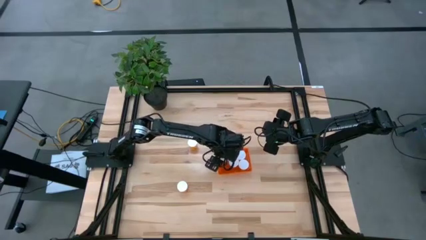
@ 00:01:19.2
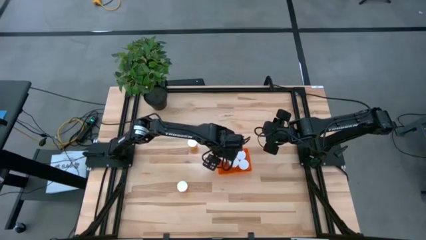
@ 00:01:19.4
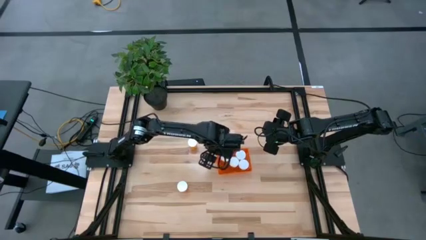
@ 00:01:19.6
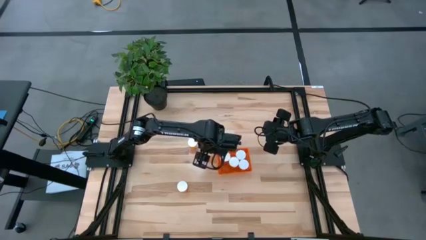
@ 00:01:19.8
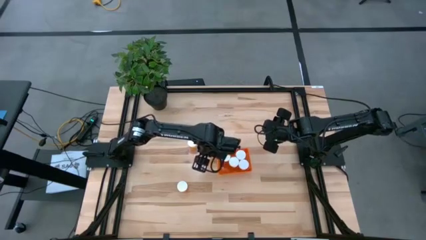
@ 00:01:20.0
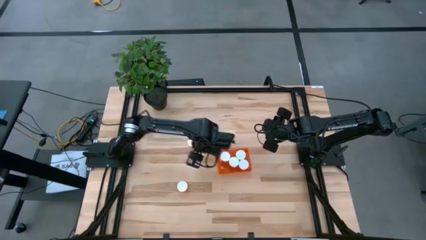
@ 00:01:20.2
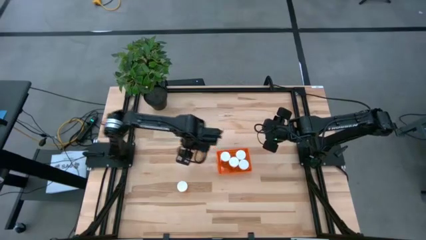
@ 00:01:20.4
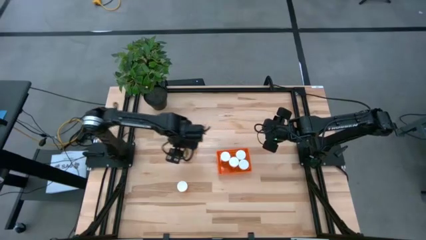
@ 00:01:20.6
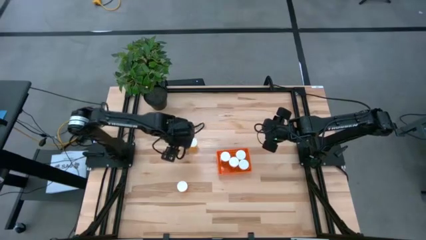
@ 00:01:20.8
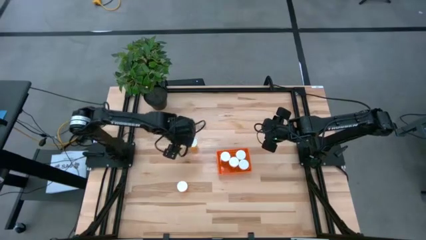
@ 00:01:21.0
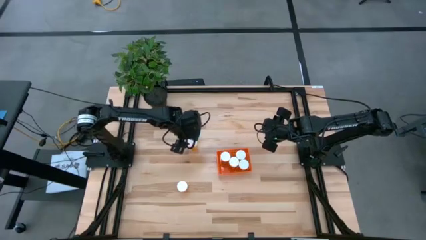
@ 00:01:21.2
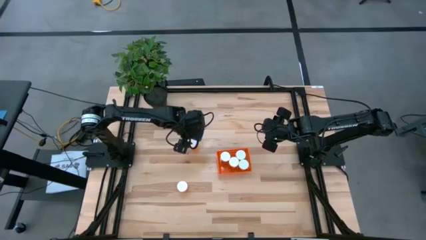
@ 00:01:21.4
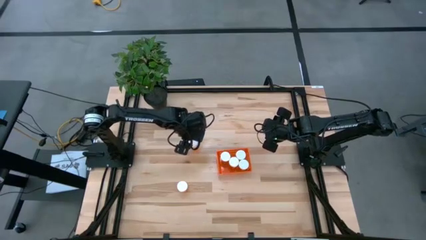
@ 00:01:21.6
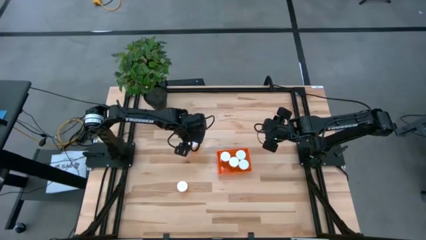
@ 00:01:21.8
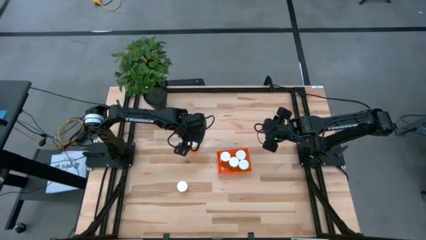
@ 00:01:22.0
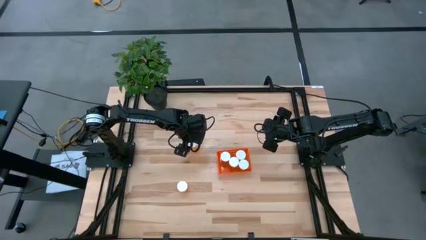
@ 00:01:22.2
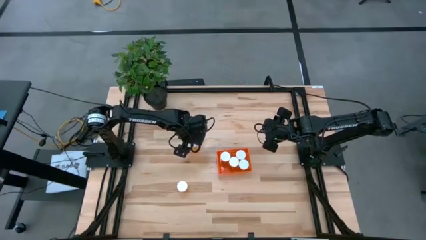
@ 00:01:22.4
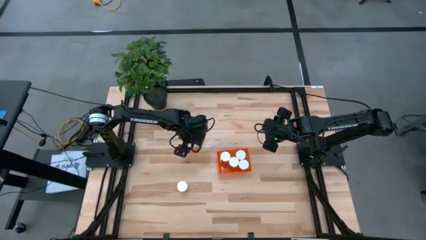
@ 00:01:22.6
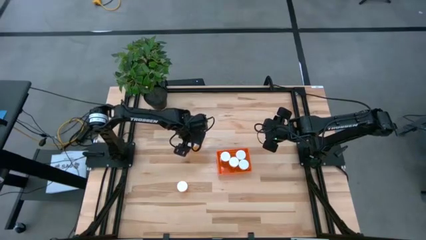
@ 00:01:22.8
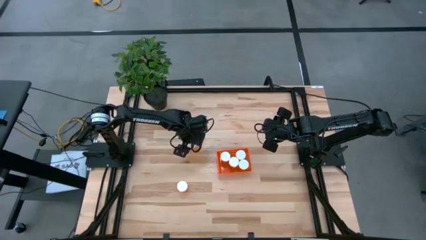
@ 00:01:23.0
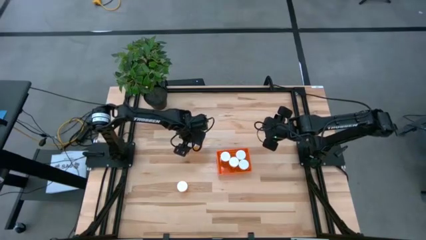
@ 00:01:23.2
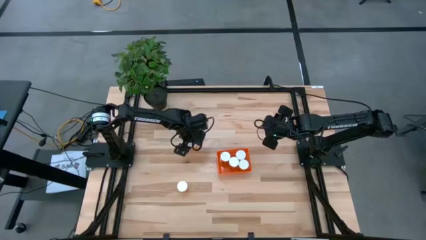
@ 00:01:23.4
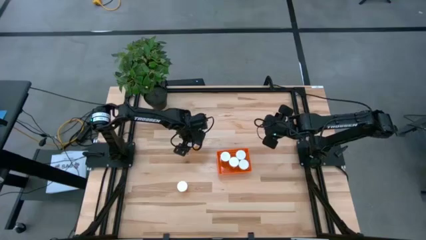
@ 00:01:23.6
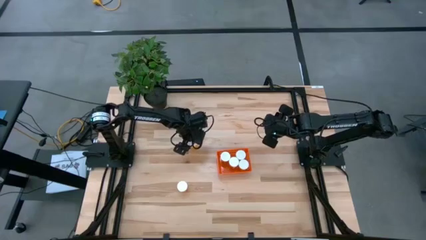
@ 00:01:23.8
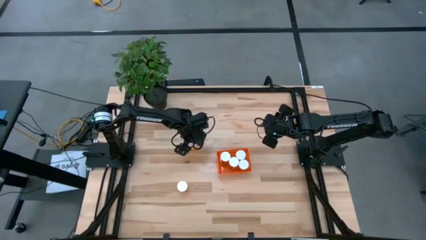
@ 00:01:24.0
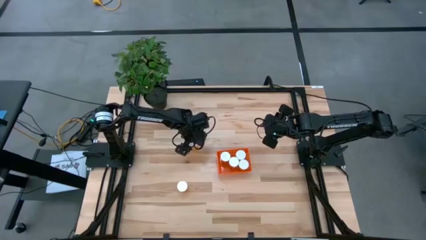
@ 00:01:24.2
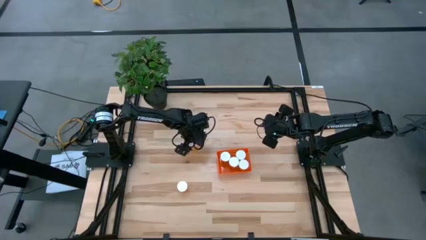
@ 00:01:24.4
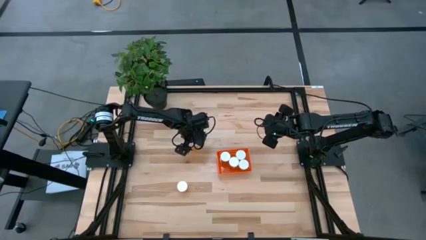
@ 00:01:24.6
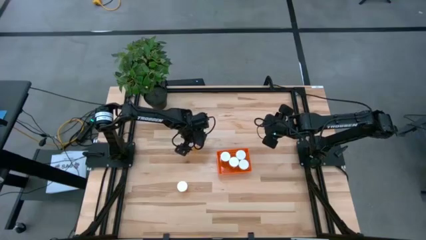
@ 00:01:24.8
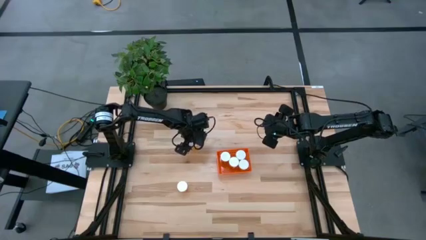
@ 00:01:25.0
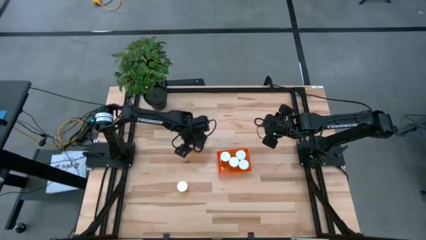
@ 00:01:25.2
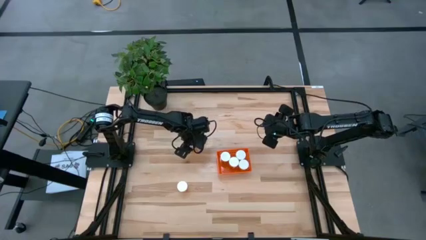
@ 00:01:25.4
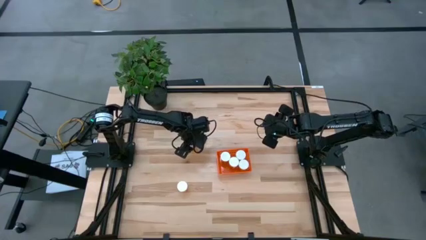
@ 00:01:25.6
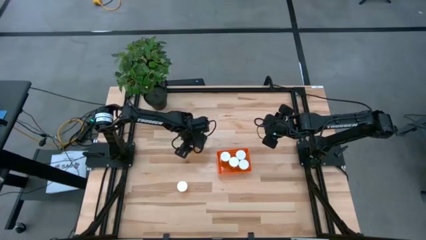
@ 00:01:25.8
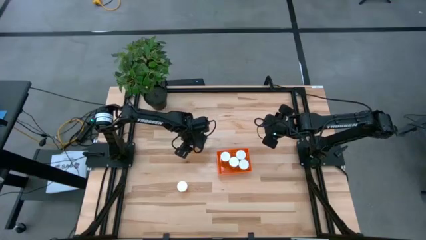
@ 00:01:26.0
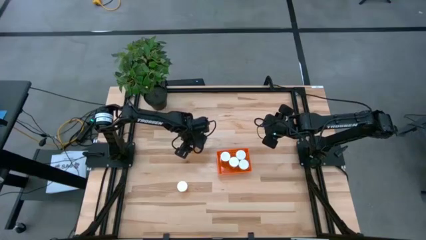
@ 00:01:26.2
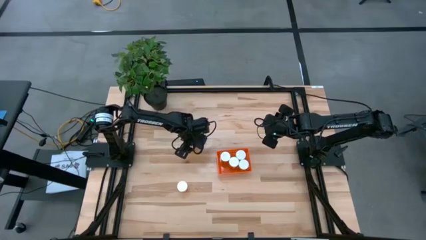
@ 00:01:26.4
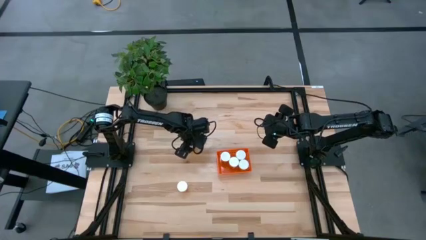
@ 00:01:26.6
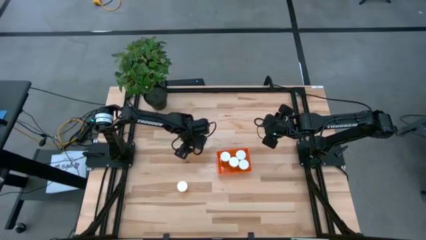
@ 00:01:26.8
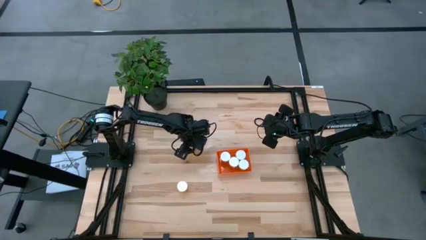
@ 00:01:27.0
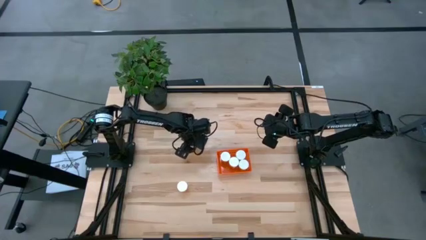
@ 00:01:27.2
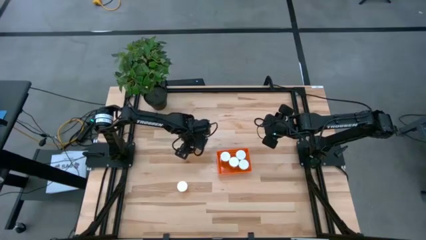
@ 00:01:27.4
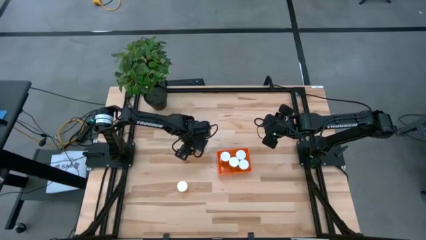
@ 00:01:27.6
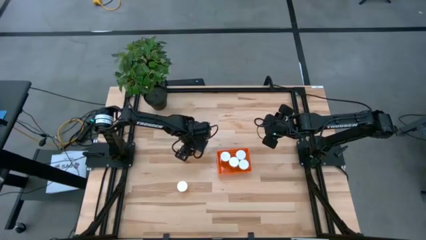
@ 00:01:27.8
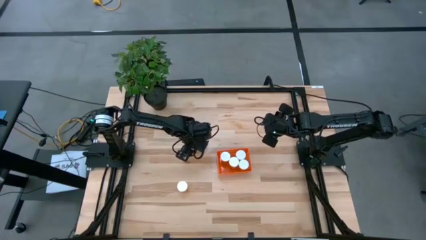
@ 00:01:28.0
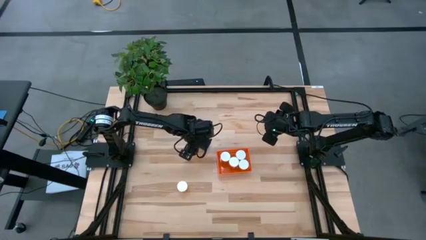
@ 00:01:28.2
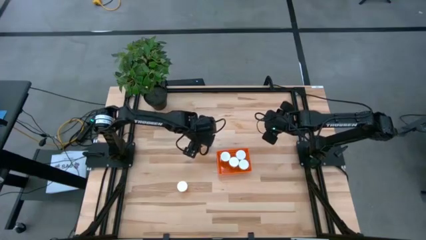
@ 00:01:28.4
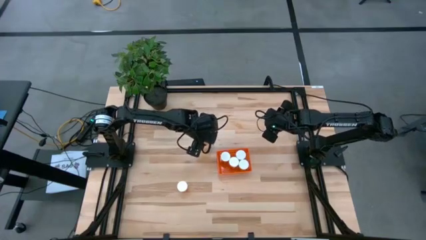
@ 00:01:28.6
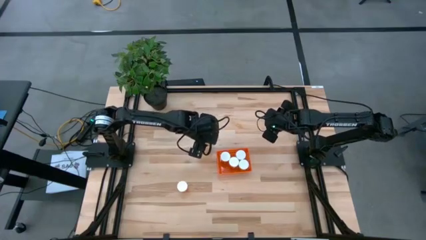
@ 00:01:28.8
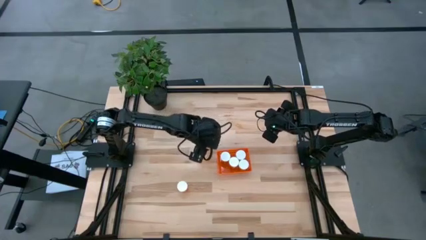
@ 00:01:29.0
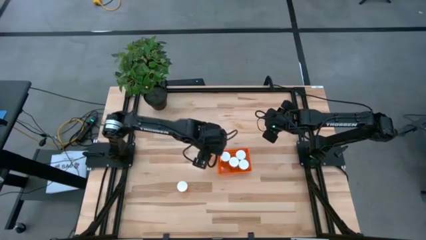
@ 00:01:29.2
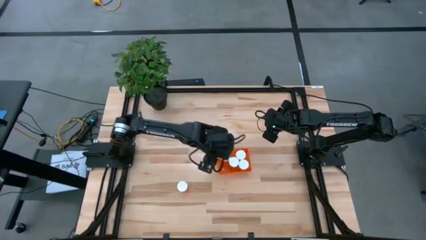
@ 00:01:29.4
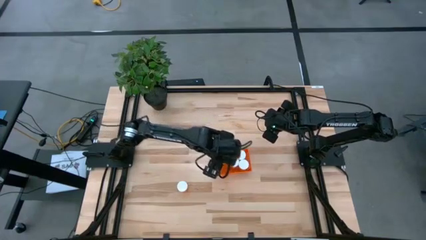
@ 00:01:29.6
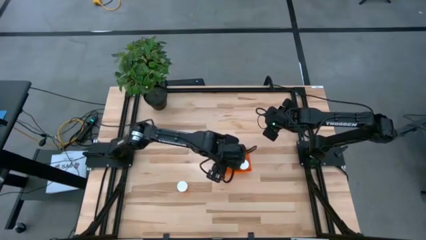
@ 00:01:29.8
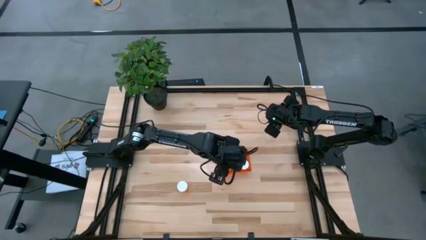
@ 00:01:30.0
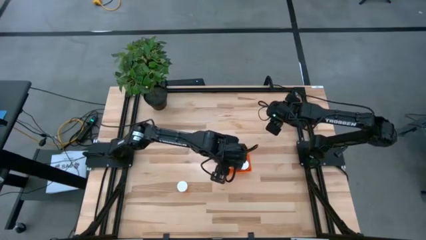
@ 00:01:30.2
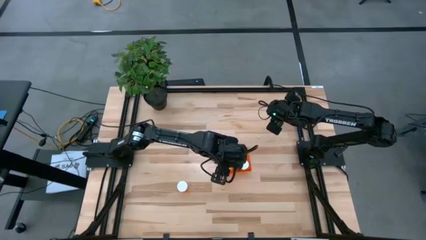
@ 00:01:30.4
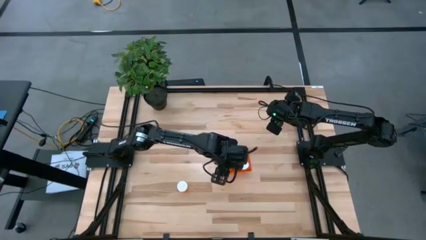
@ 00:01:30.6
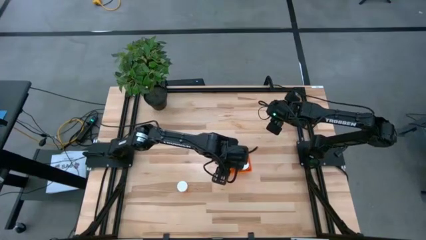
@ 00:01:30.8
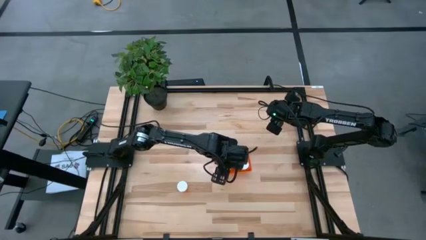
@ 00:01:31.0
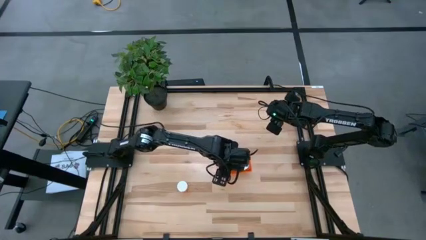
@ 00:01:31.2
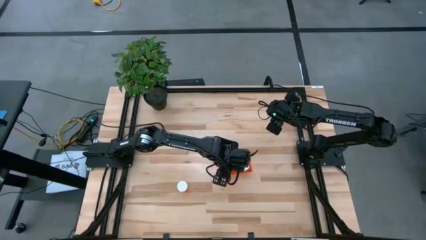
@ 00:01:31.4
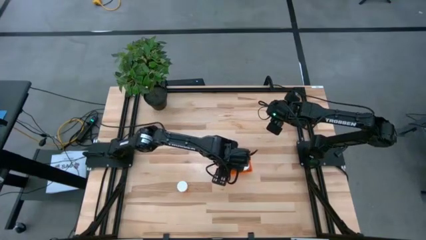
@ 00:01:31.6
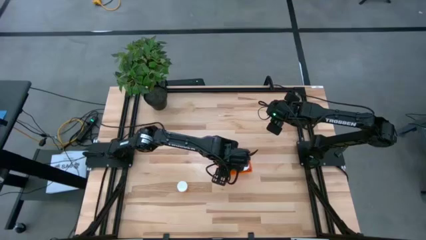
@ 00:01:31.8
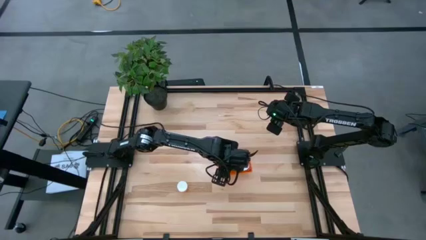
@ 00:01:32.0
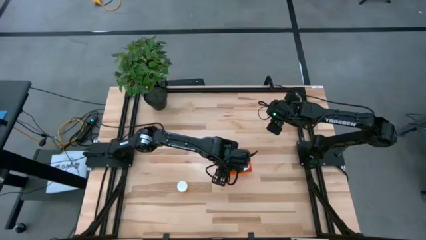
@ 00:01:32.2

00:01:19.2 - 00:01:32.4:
Task: Pick and place pill bottles into a basket
Put the orange pill bottle into the orange bin

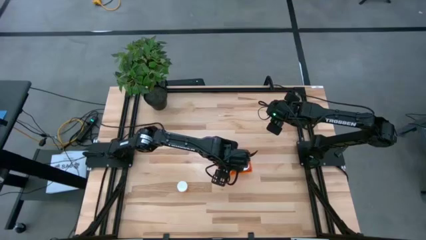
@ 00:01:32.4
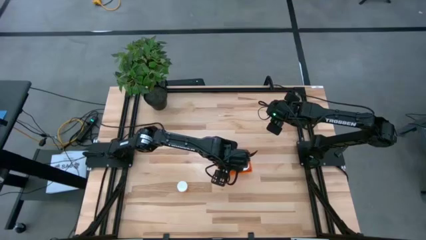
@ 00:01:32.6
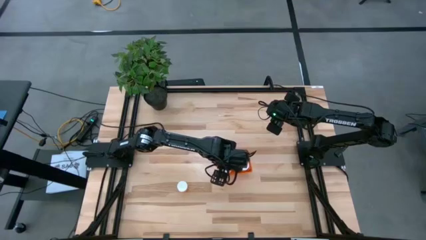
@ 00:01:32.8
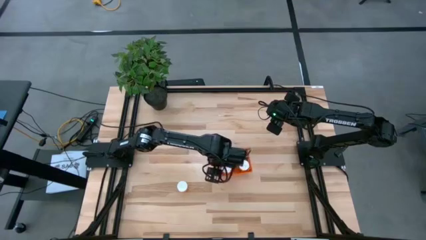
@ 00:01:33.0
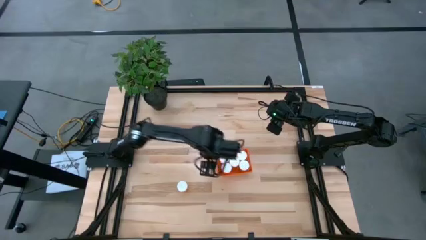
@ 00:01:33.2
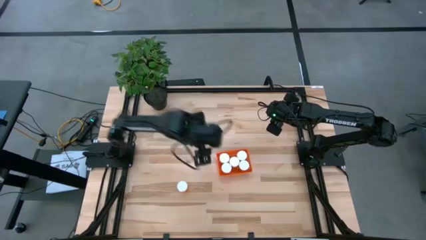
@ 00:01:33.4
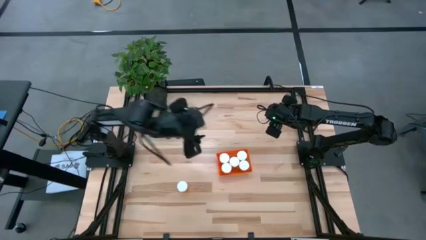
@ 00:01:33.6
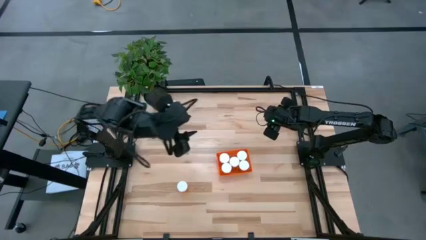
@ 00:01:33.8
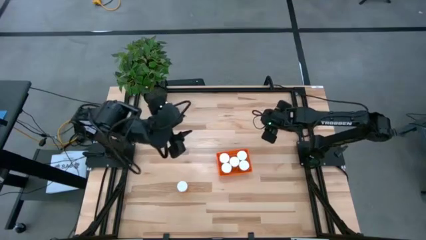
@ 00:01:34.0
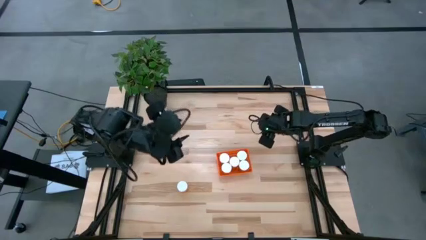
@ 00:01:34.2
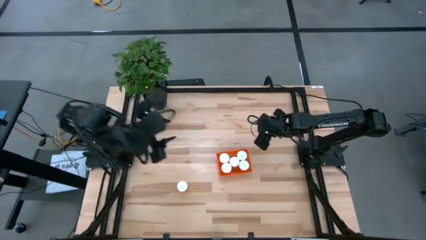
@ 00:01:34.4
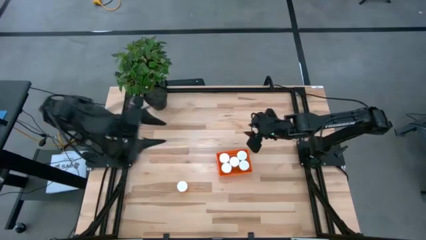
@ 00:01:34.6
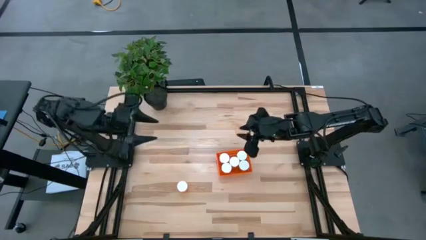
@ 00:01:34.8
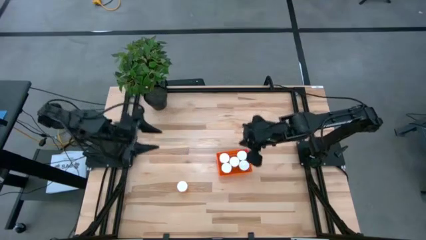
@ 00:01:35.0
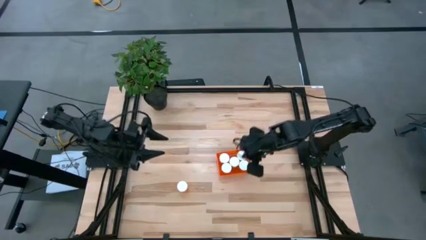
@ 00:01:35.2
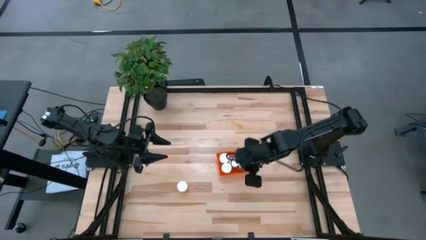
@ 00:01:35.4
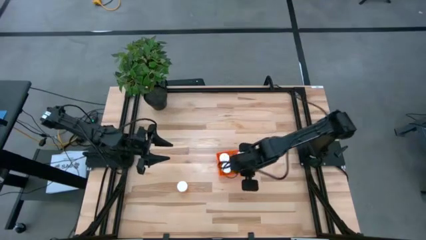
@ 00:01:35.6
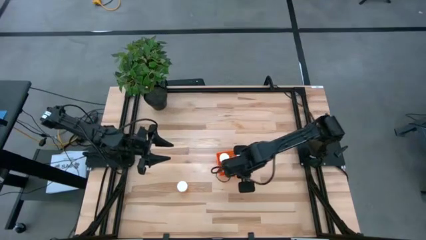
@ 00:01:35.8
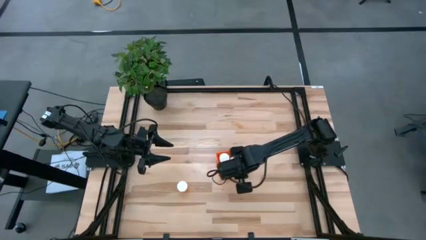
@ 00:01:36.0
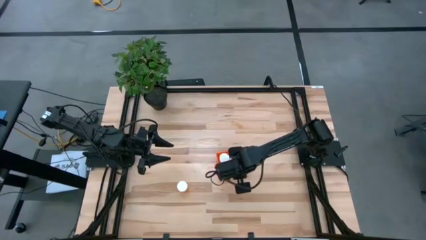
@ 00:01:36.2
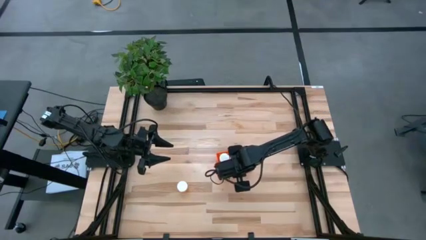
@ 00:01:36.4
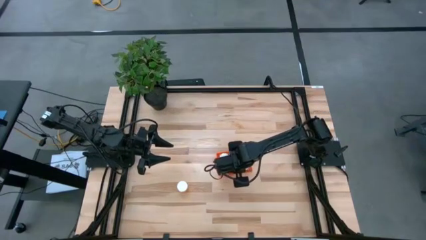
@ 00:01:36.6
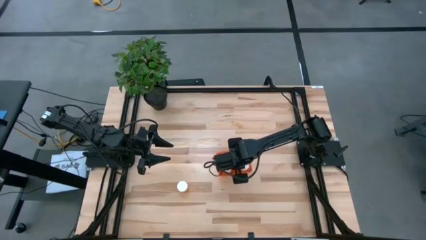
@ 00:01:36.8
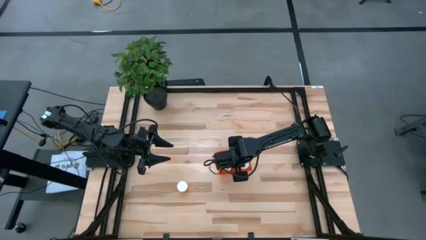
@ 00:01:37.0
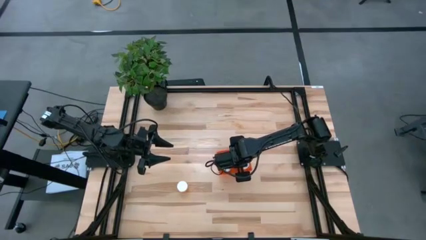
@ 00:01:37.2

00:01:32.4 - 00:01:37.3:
Adjust the orange pill bottle
